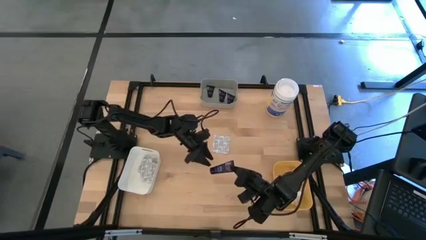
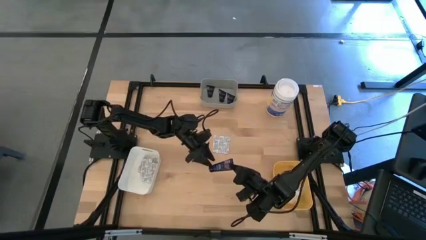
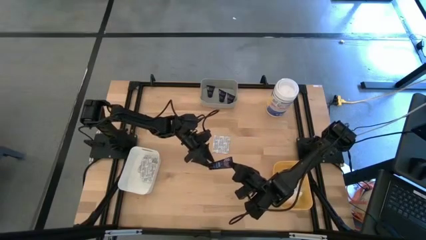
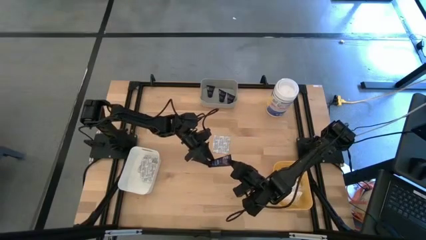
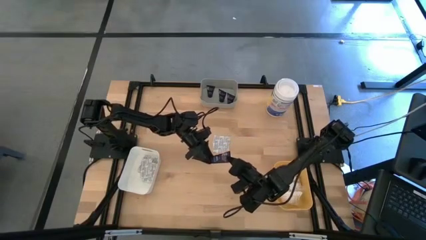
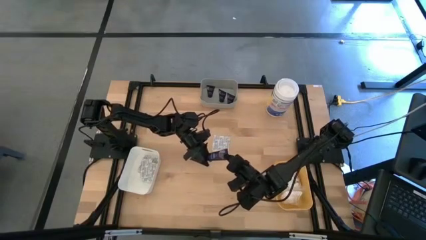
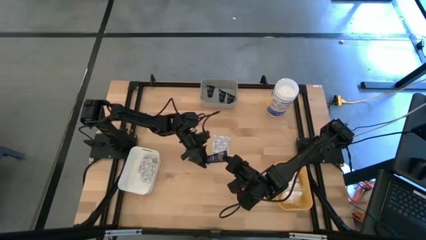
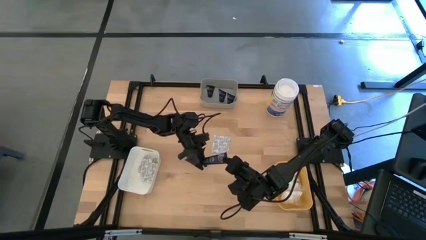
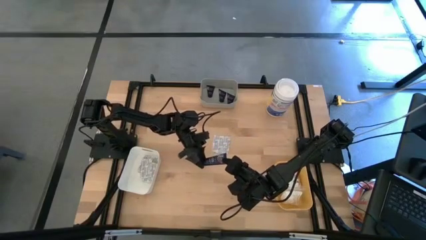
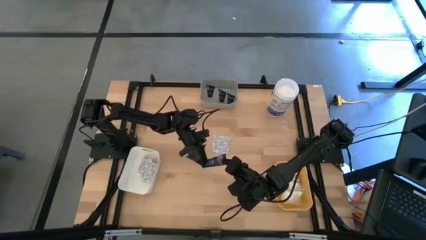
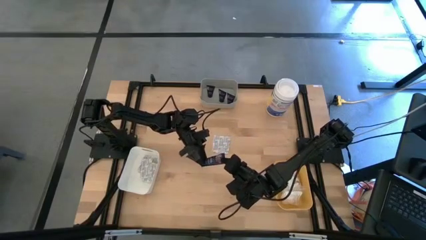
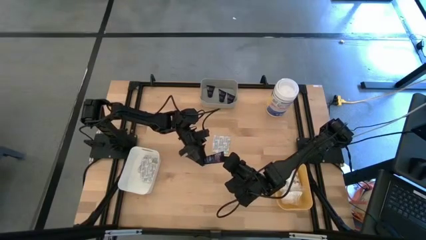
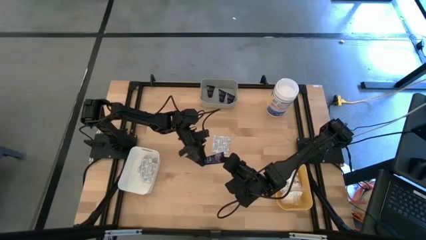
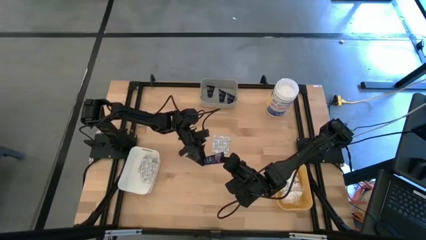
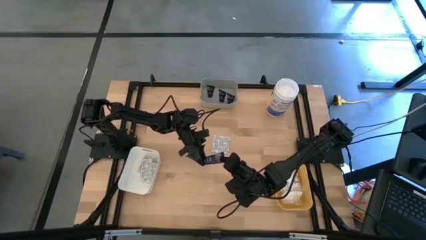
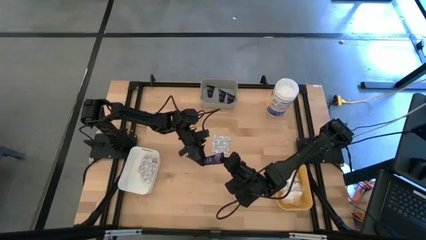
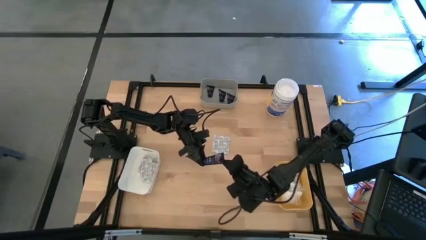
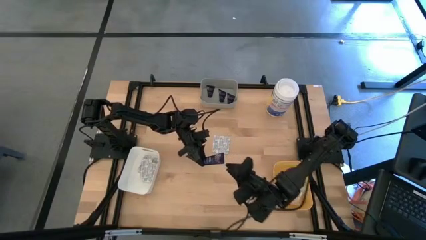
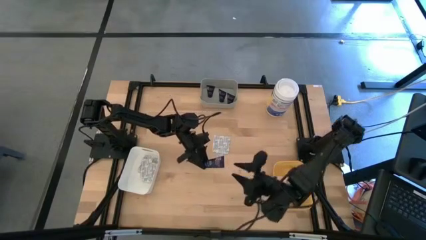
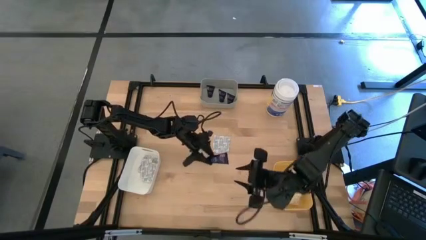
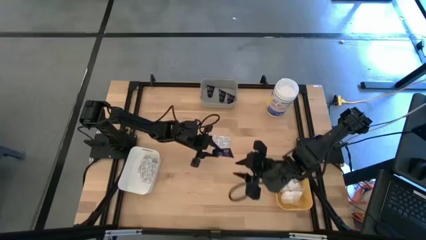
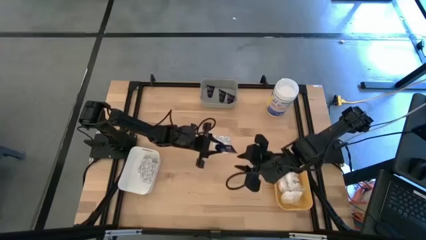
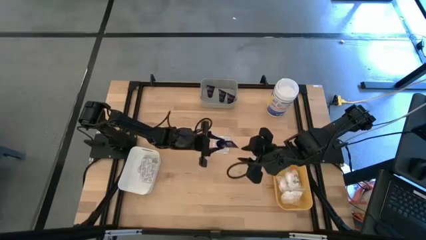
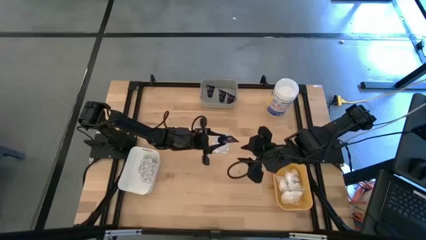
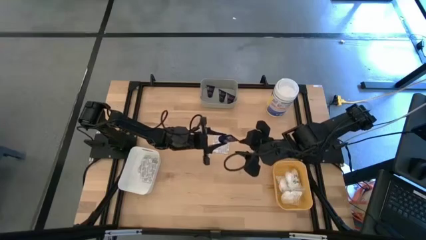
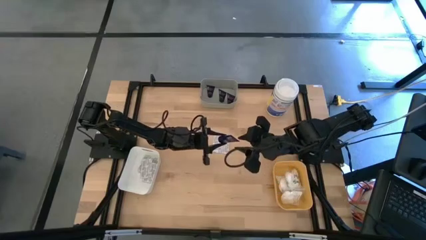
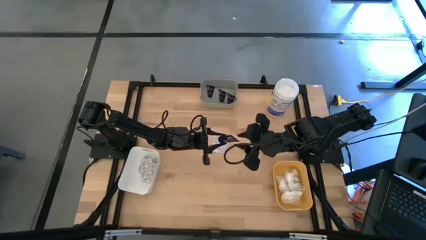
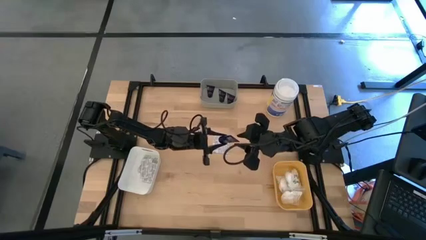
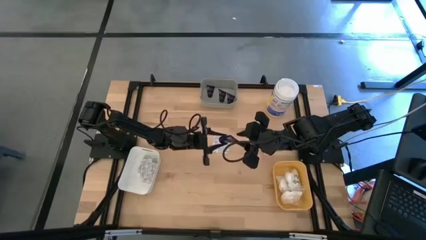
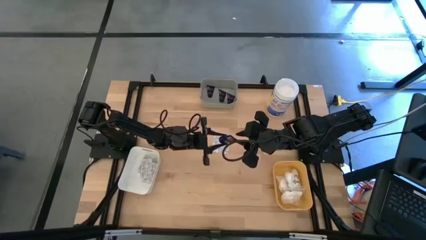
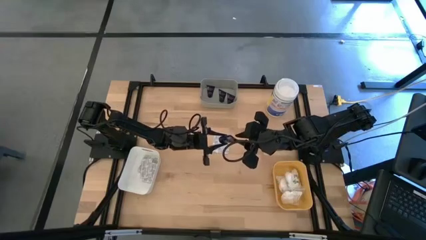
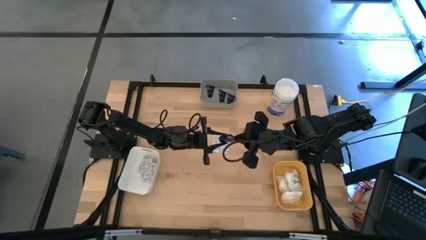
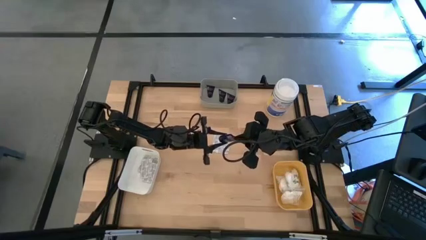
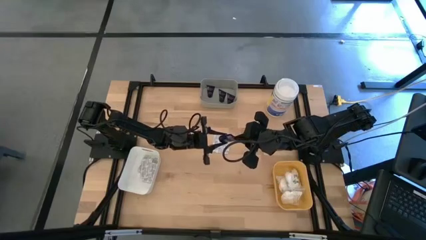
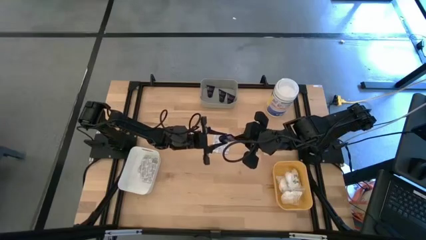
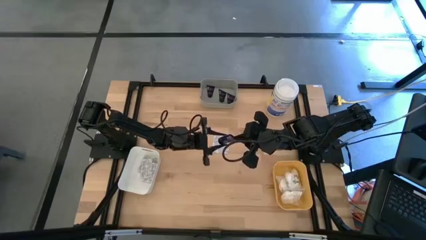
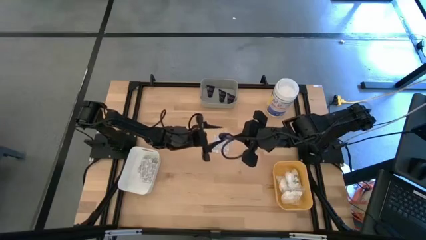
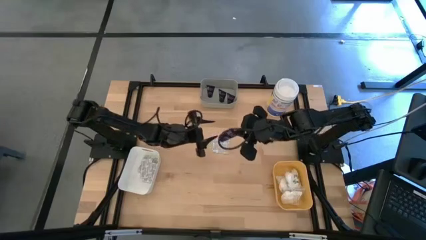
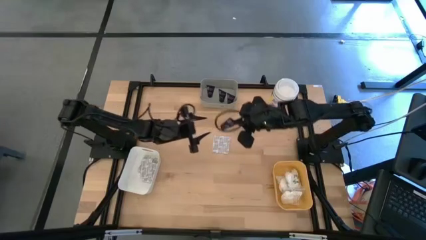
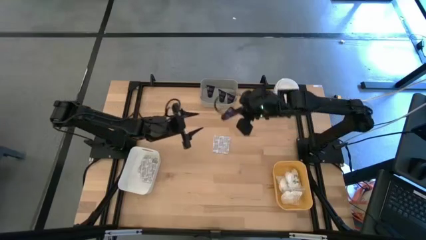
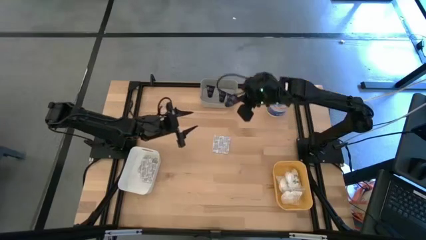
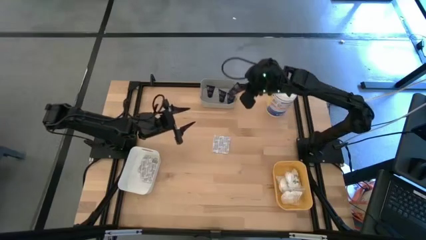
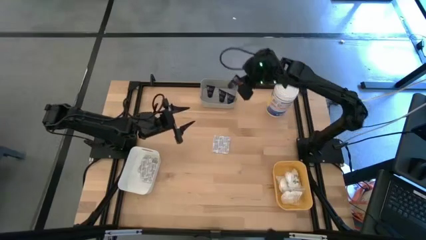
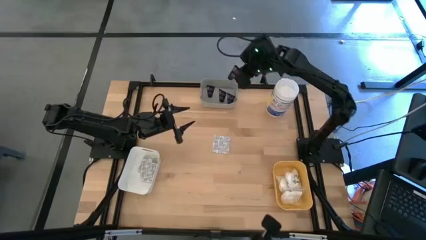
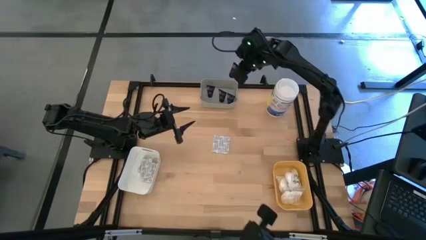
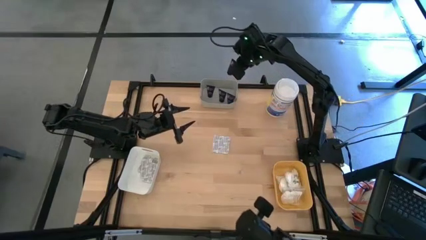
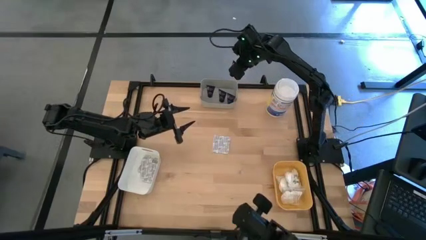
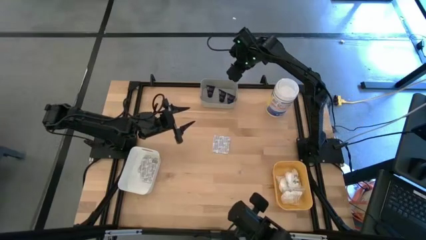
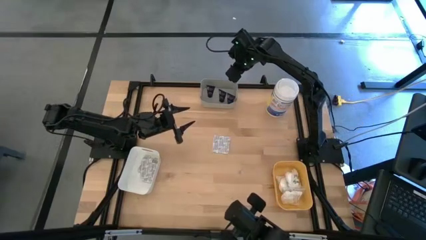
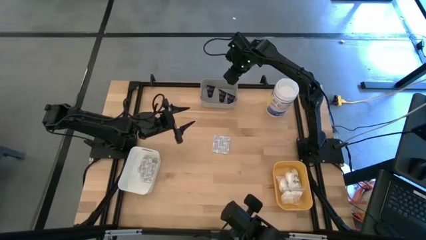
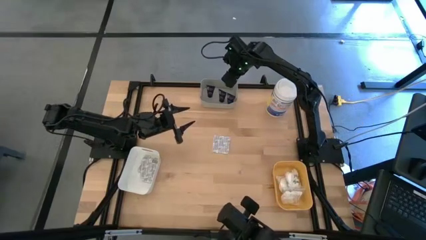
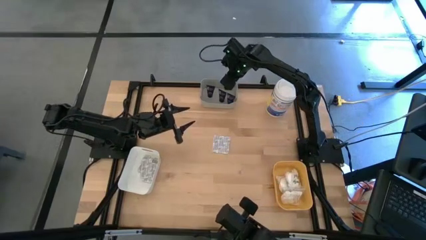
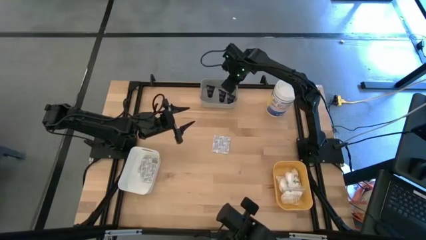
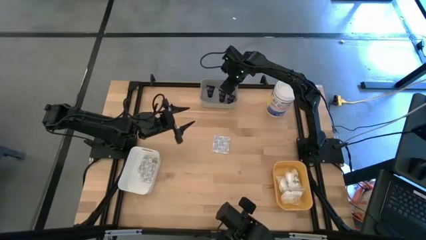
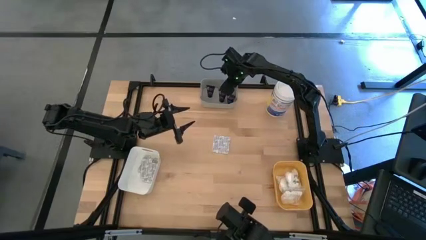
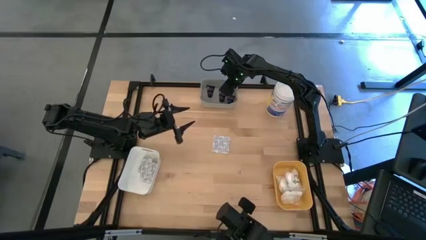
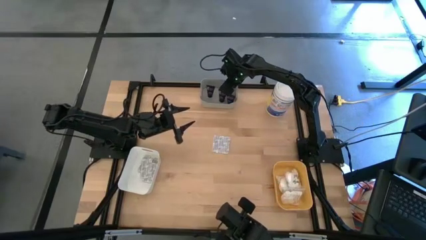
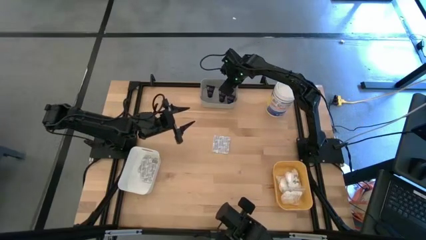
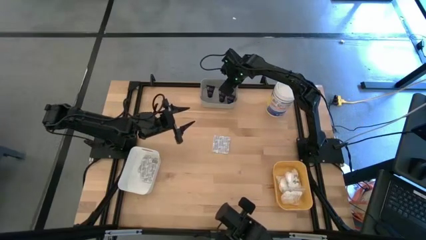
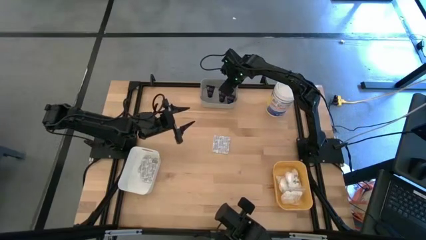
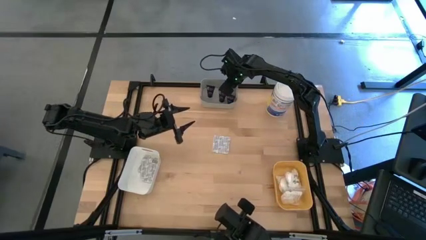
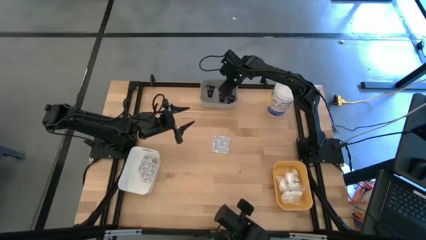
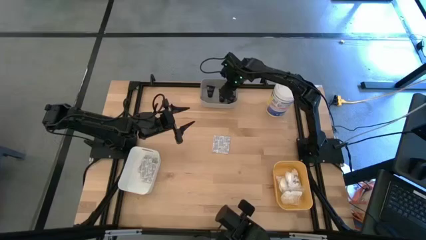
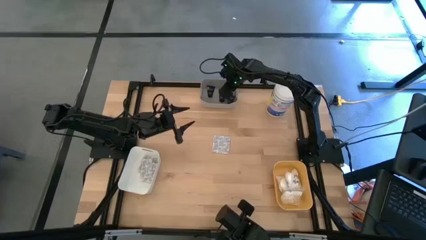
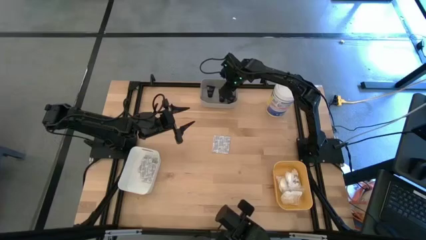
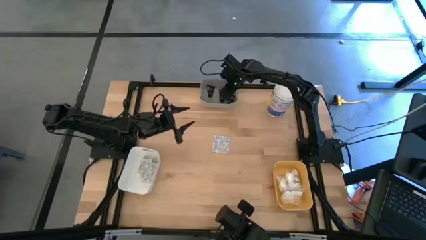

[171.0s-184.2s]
Task: Pick & Place Travel size toiletries
Put the shave cream into the gray bin

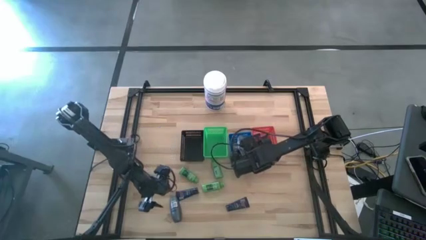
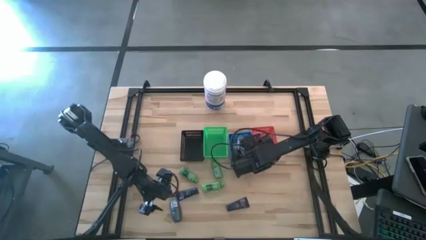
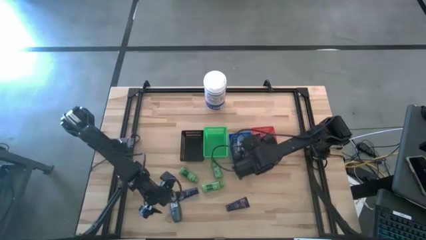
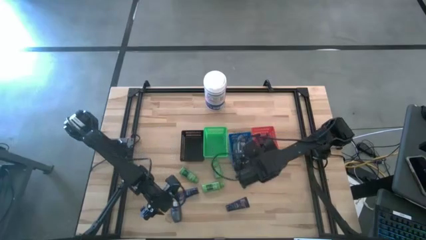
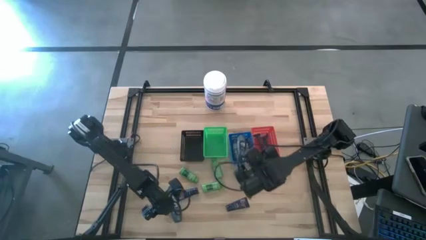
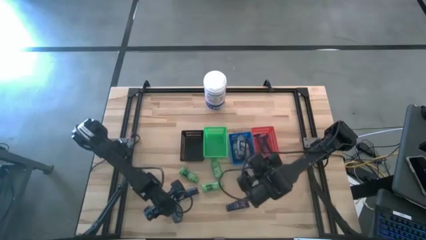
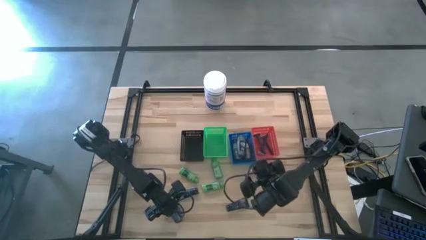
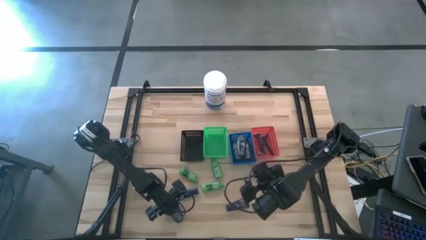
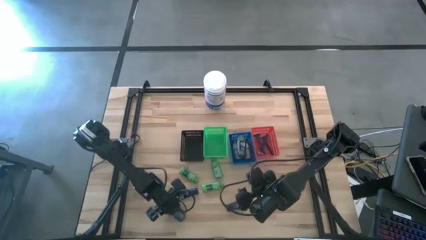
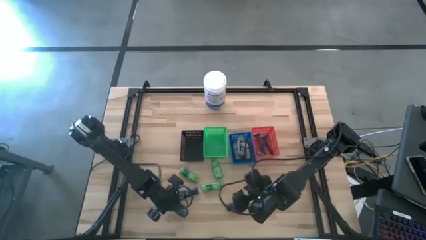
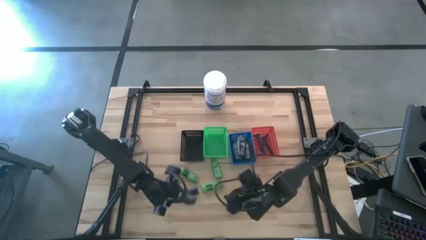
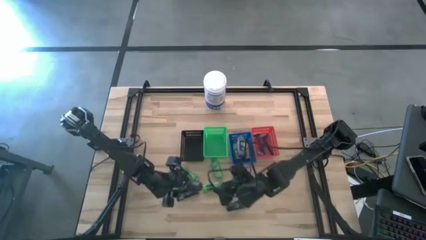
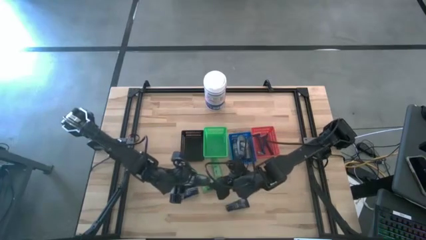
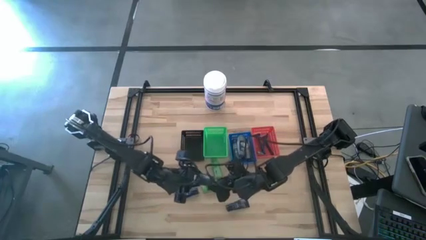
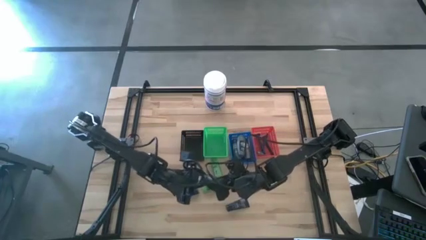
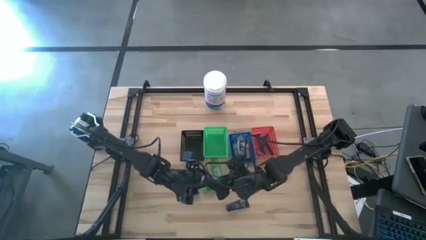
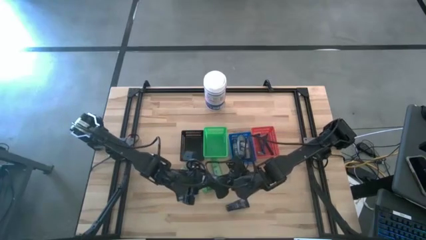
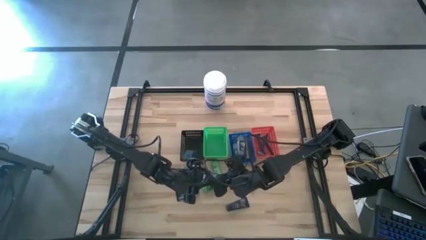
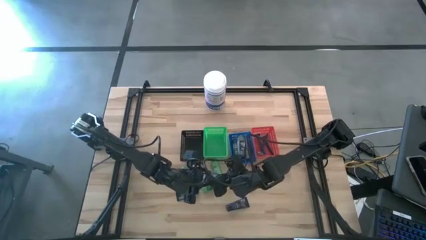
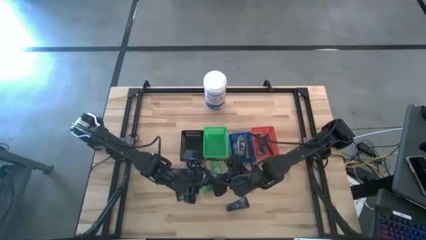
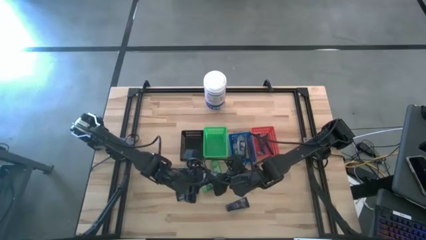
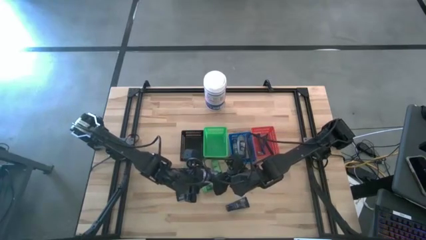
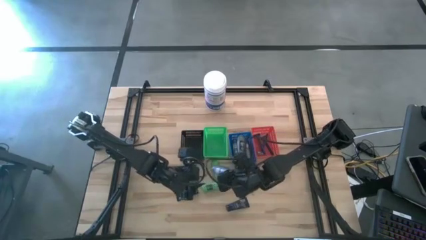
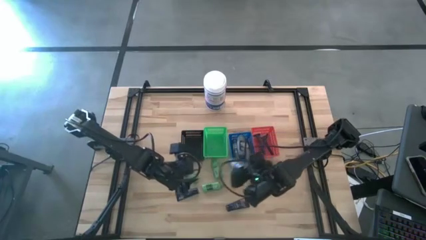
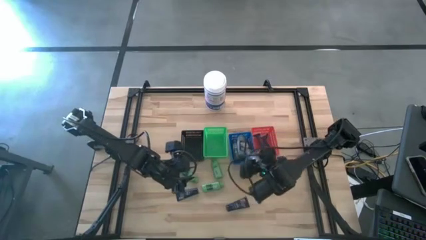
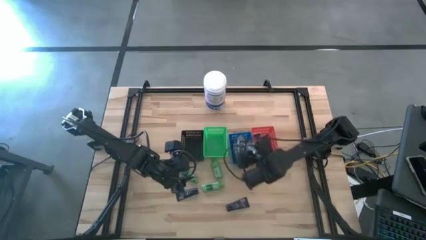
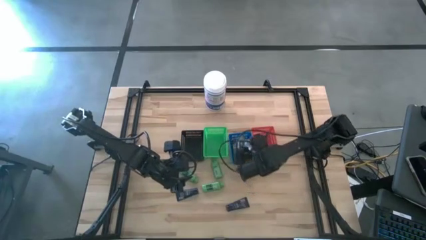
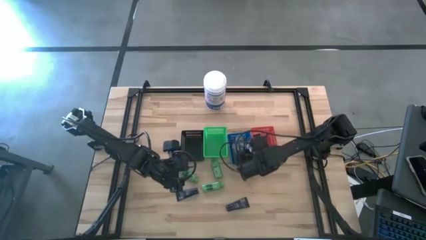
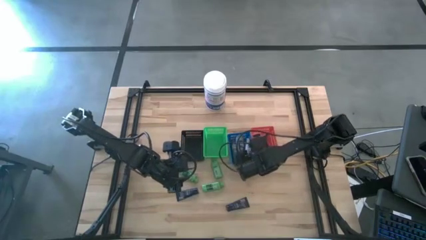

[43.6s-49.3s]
Task: Pick & Place Travel size toiletries
Put the deodorant into the blue basket
